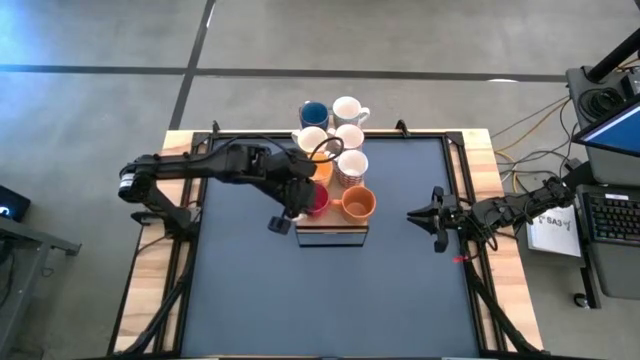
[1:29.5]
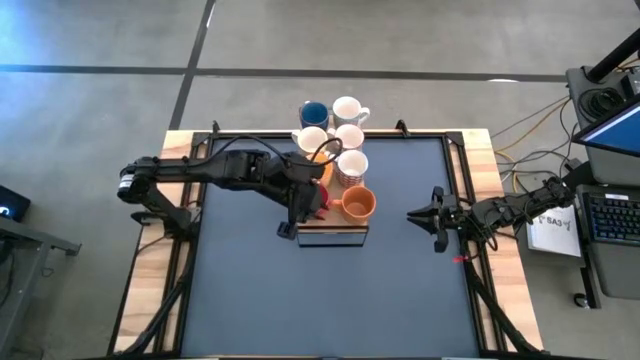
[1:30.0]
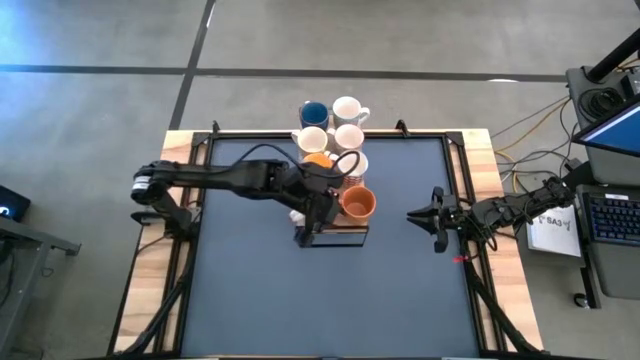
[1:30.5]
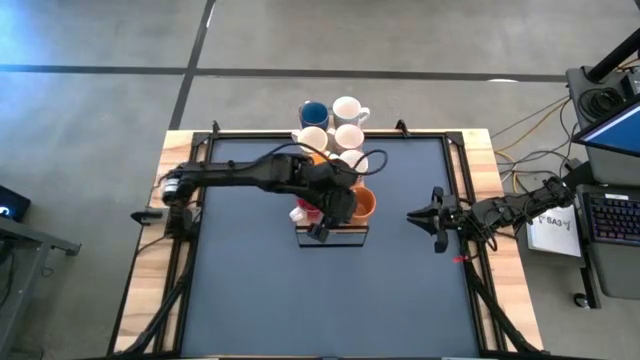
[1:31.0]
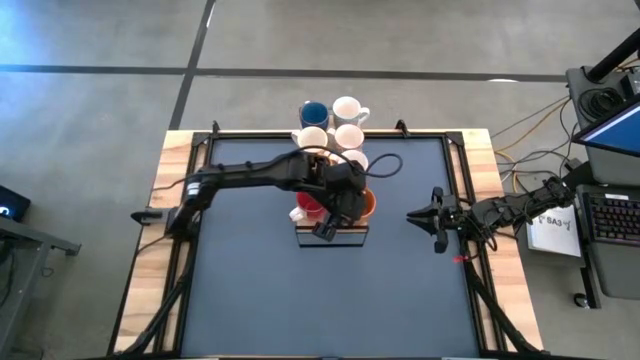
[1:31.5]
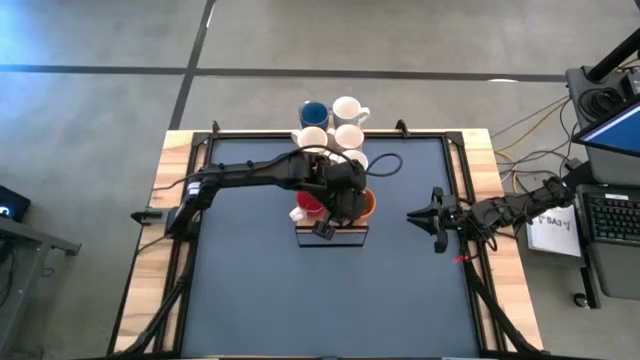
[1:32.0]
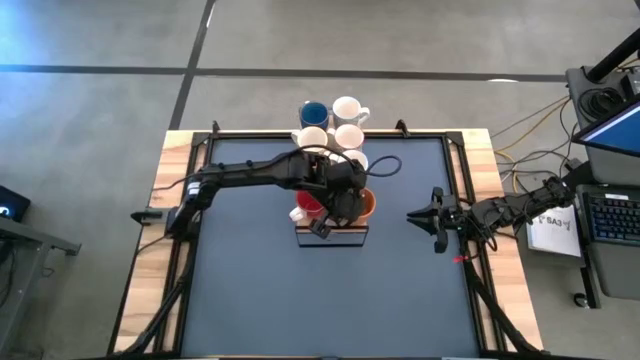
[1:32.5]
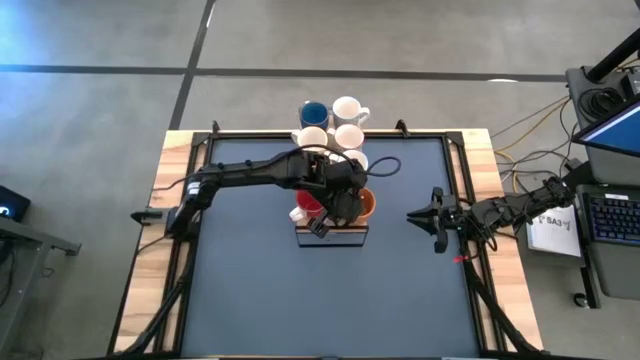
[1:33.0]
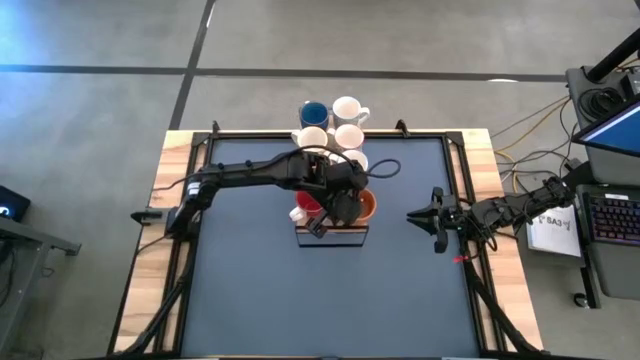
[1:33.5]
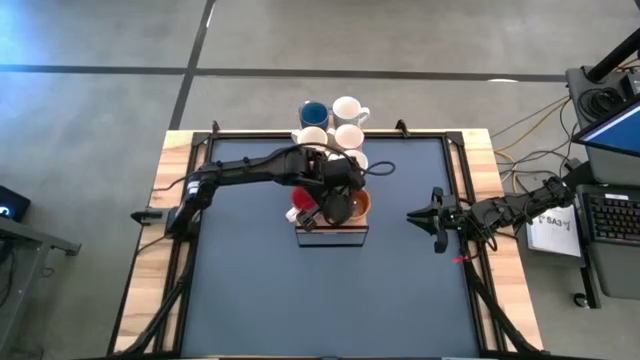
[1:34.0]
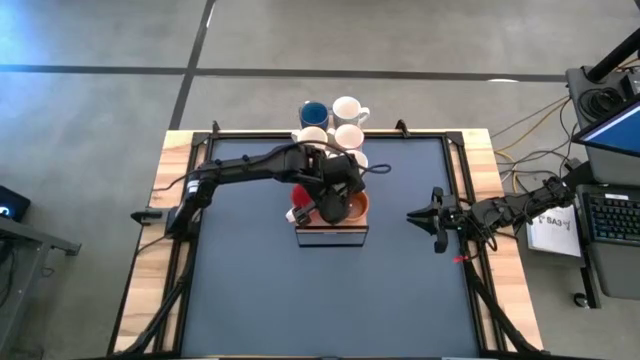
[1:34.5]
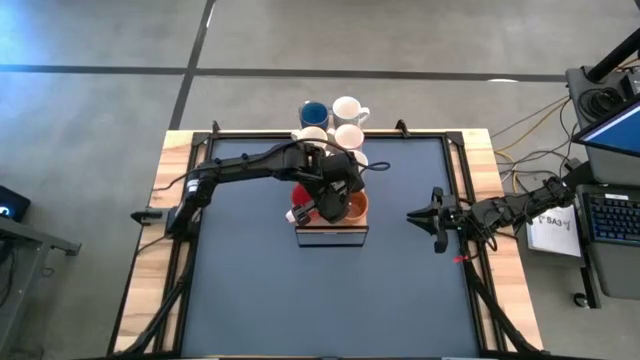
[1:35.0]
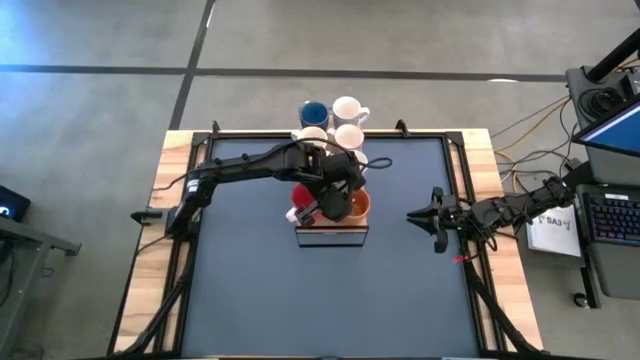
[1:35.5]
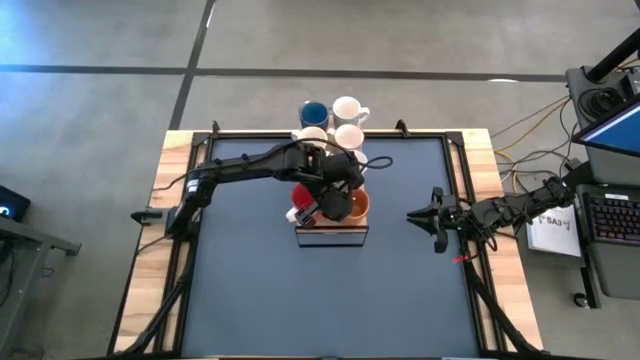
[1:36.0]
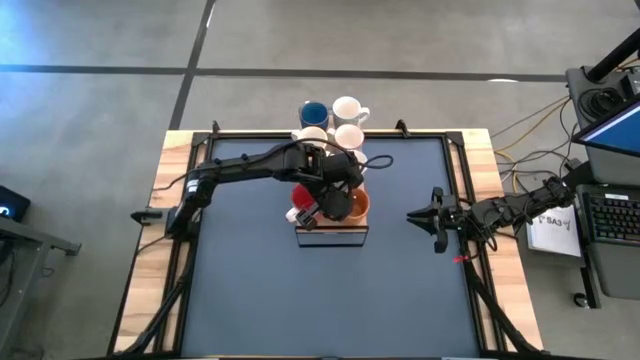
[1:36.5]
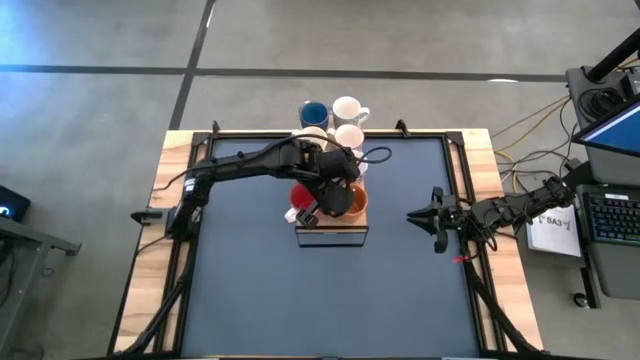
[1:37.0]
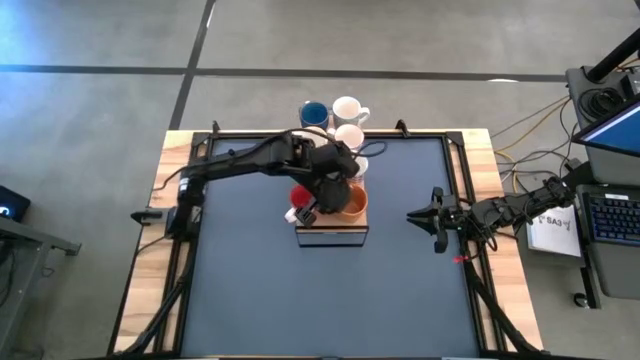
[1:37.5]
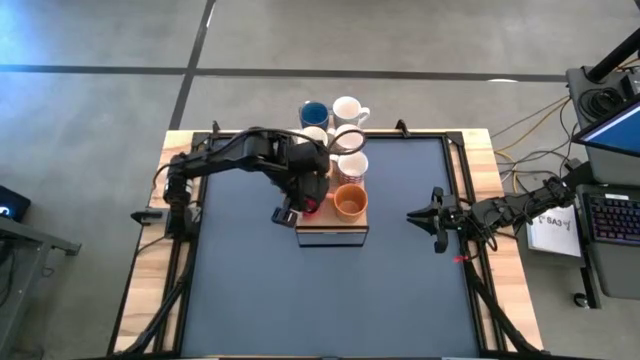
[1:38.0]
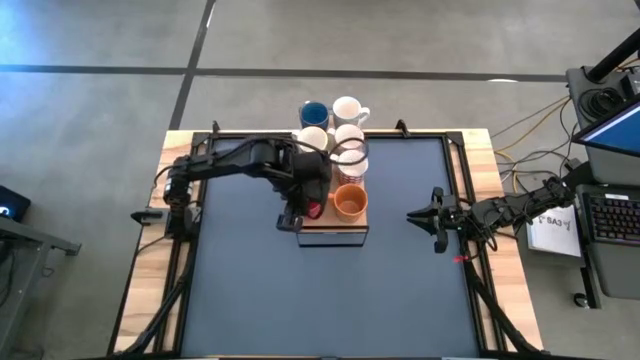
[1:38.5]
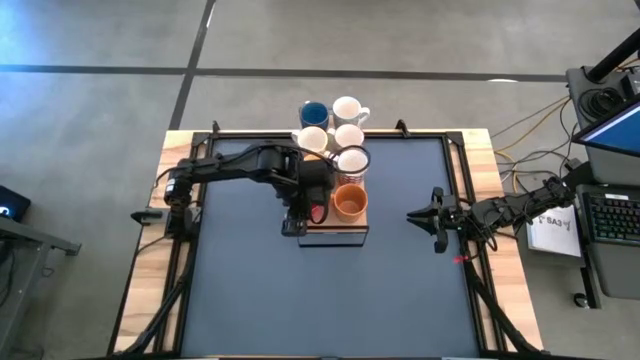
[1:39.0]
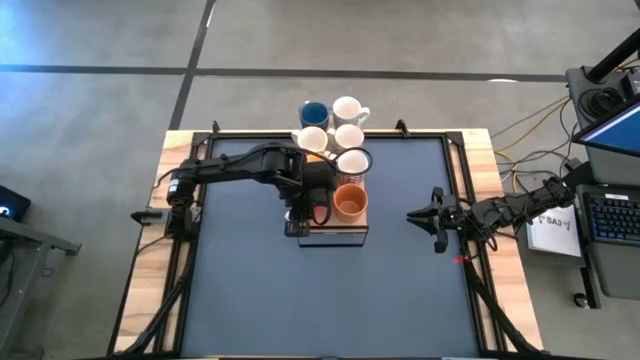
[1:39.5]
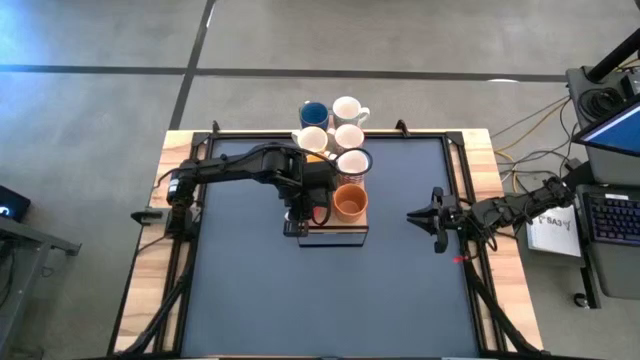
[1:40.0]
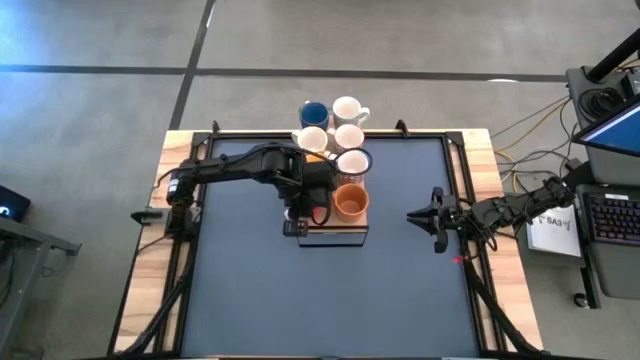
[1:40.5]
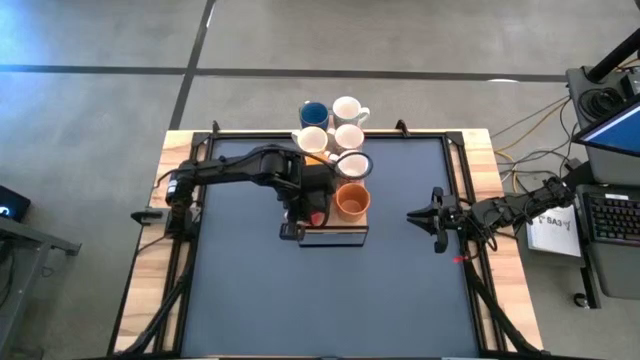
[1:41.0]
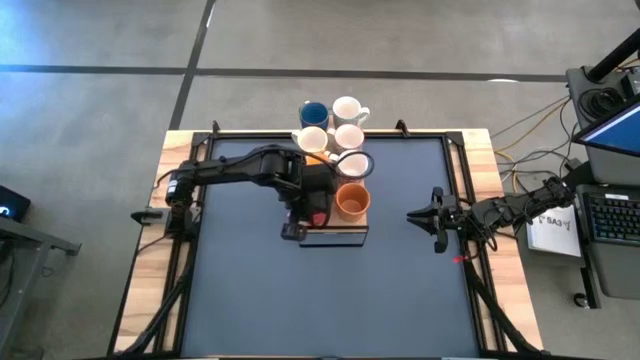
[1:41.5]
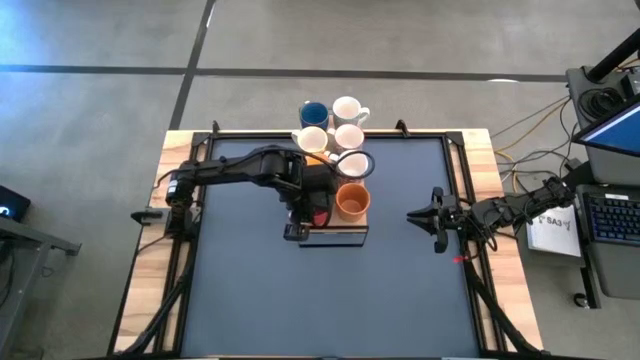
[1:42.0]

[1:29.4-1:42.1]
Task: Place coffee mugs
Adjust the orange mug and the red mug on the shelf

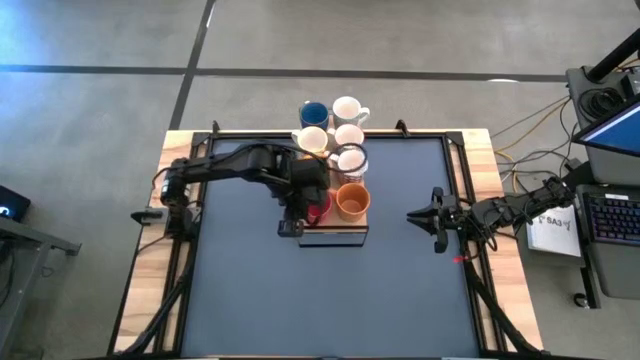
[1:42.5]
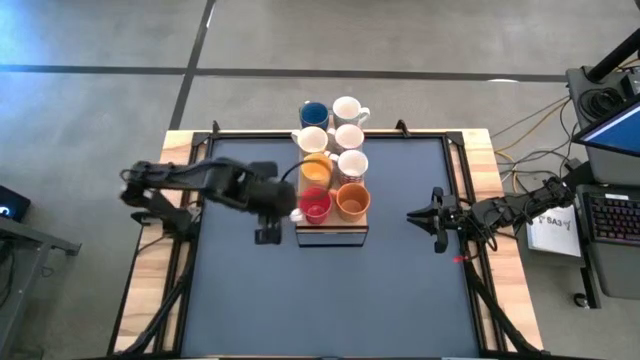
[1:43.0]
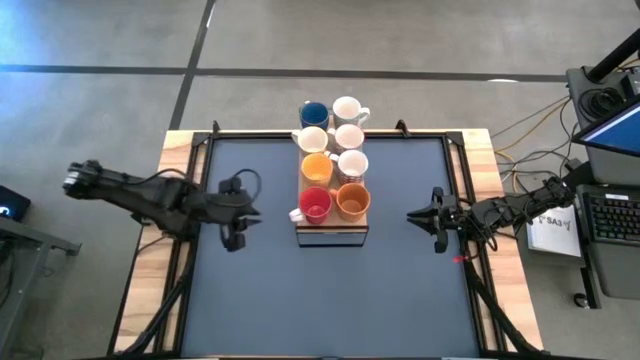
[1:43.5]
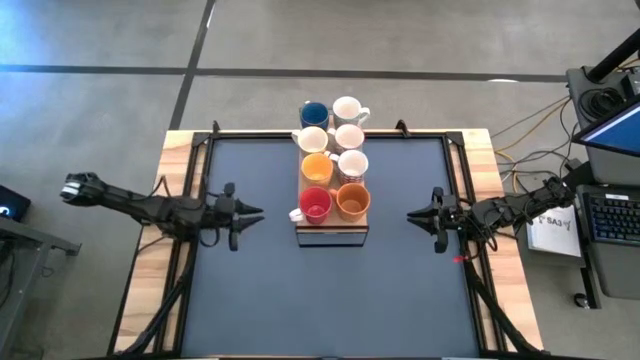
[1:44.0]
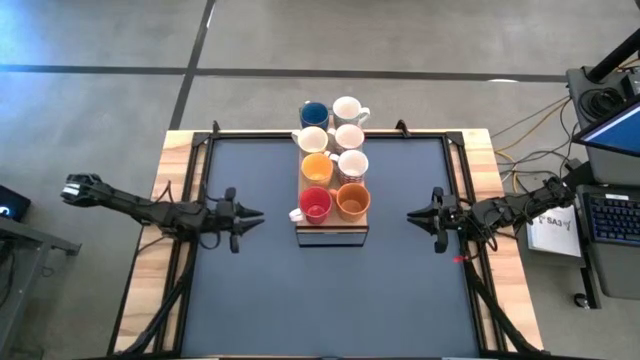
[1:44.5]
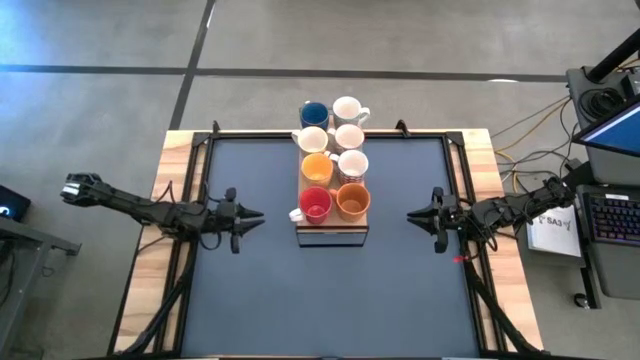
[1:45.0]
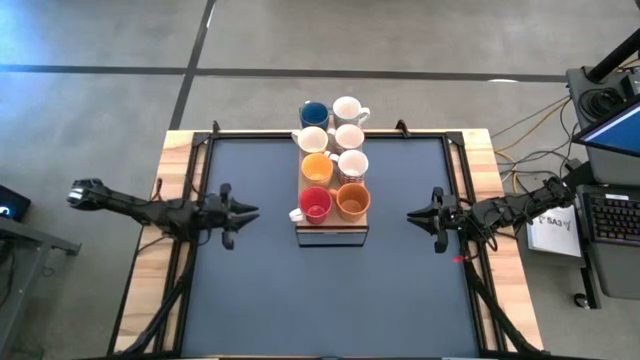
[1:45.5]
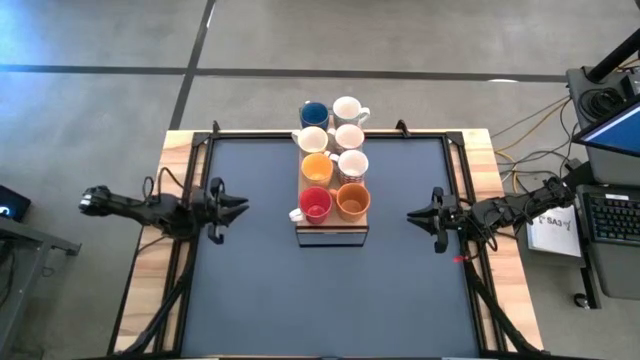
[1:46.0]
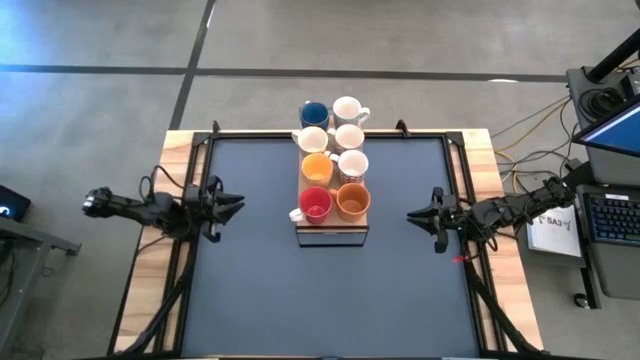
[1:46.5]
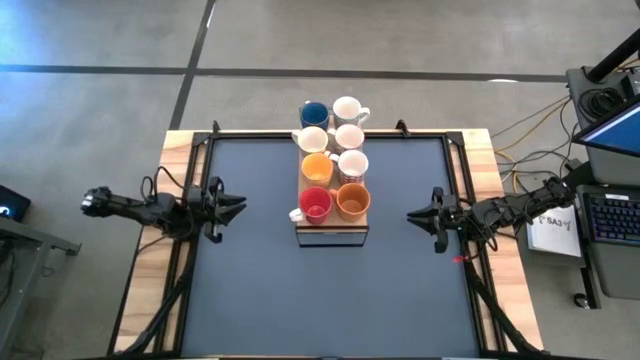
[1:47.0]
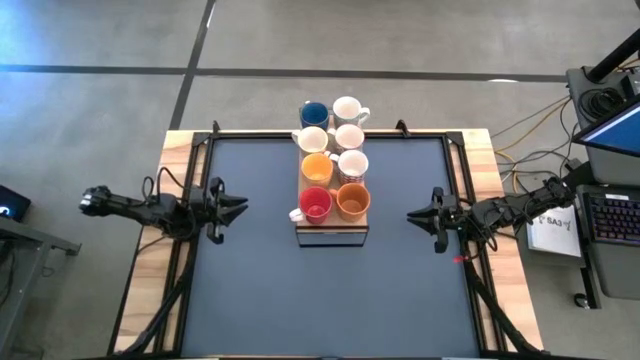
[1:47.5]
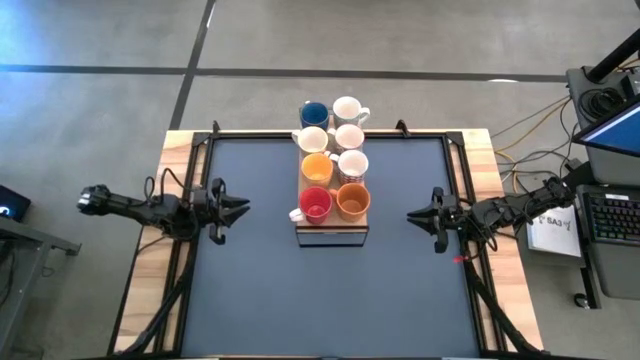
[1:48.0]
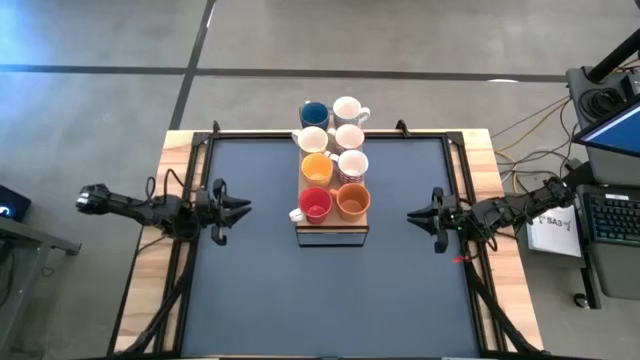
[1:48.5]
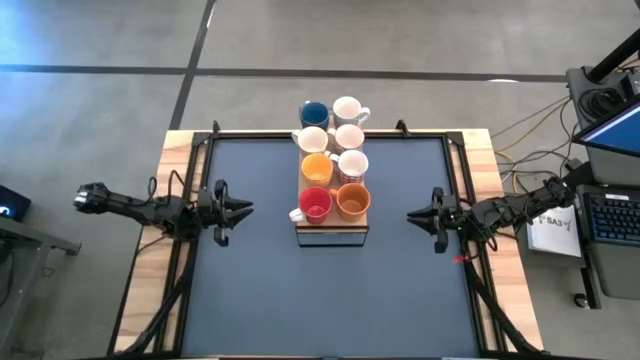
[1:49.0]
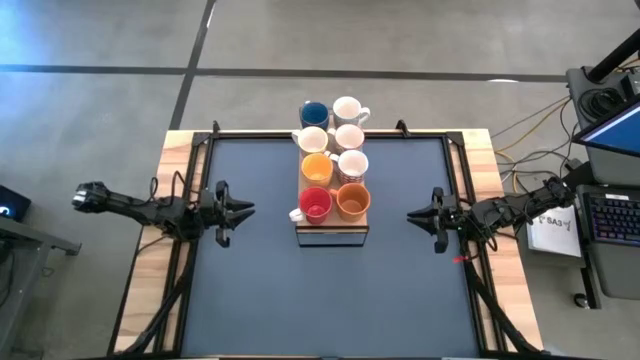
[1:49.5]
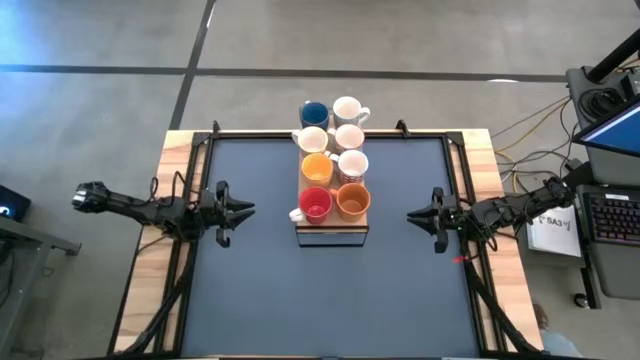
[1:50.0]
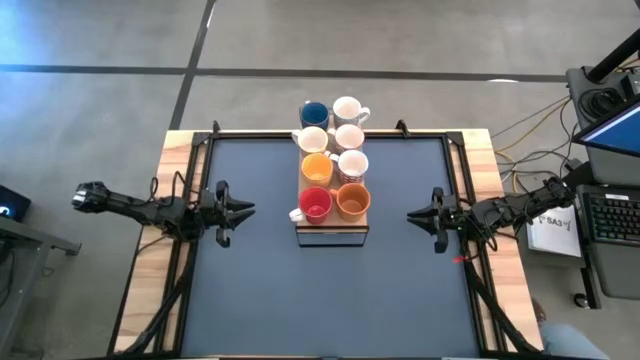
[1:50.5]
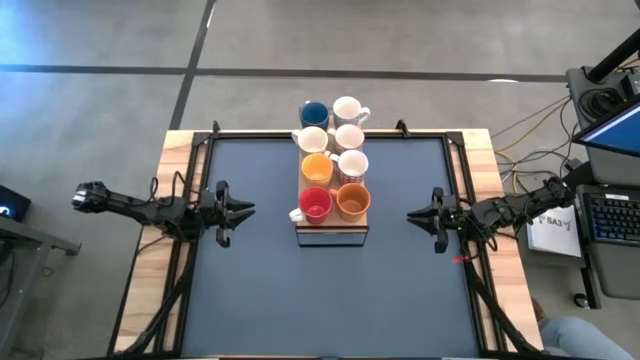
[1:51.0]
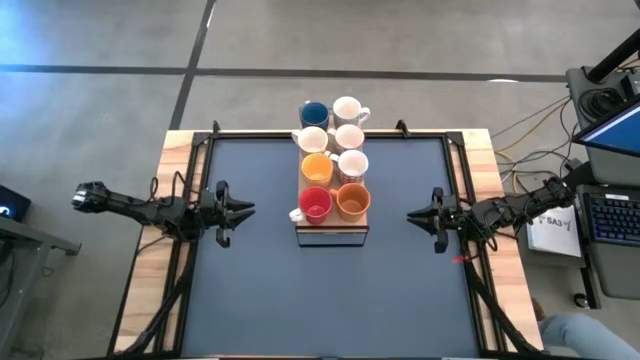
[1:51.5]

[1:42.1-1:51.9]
Return to Home Position
